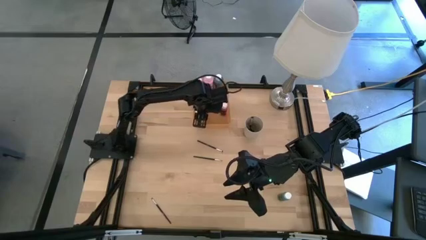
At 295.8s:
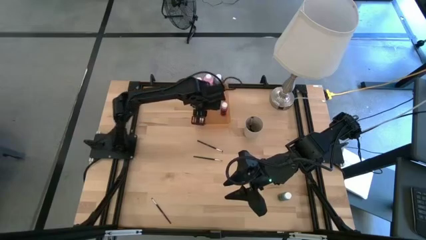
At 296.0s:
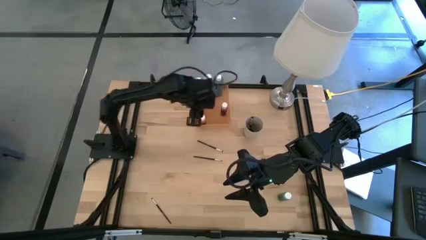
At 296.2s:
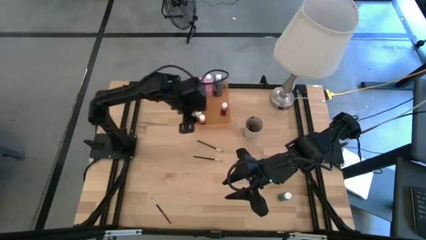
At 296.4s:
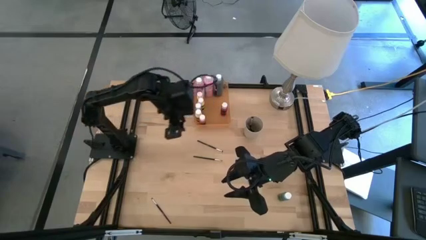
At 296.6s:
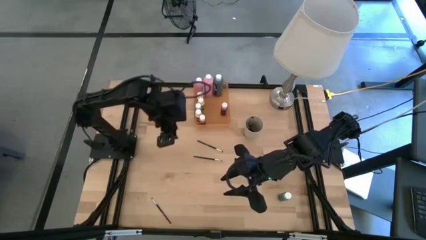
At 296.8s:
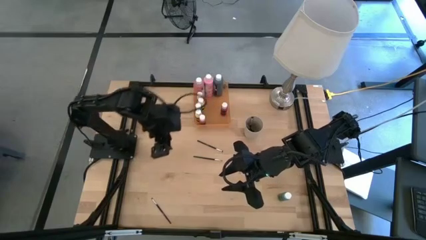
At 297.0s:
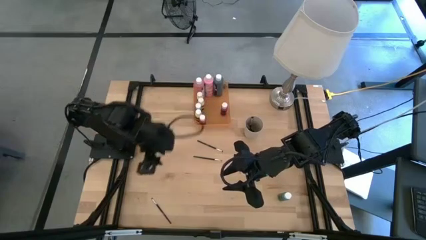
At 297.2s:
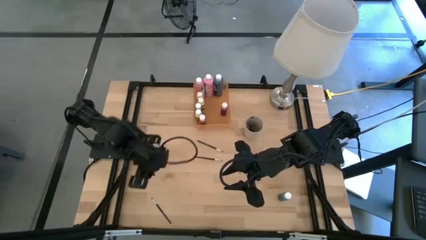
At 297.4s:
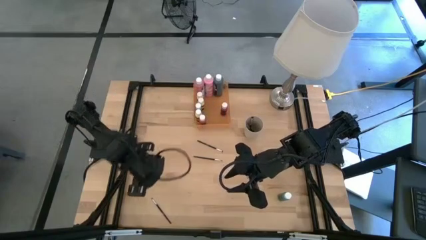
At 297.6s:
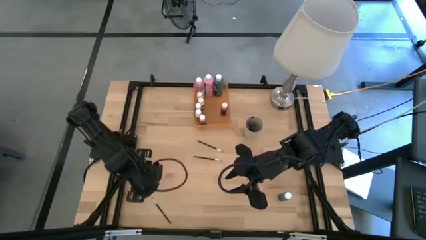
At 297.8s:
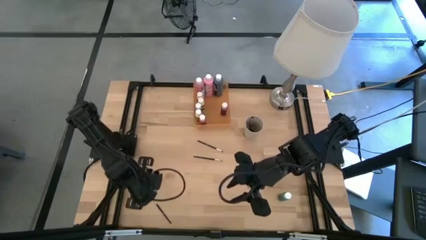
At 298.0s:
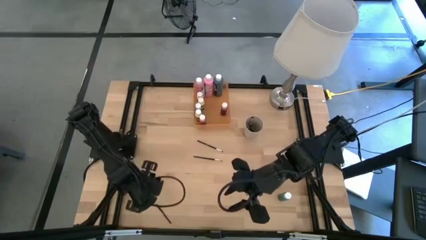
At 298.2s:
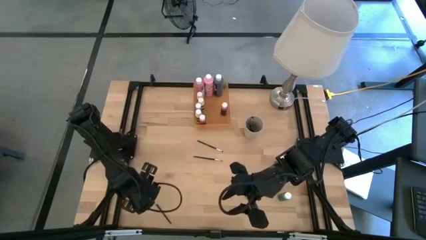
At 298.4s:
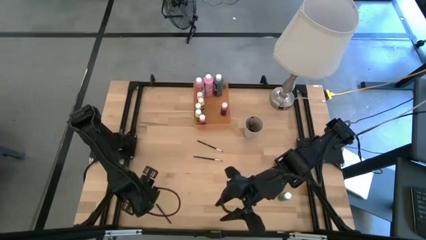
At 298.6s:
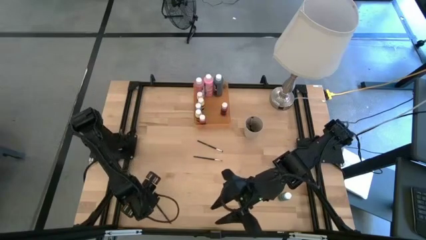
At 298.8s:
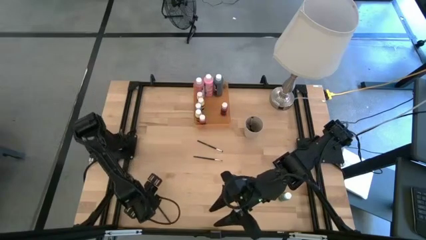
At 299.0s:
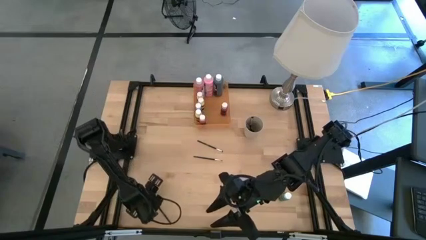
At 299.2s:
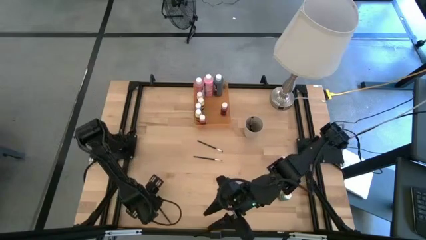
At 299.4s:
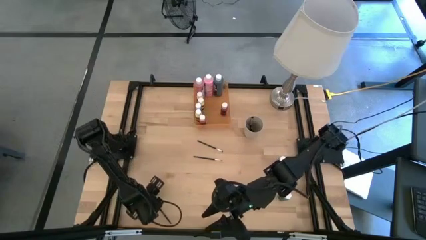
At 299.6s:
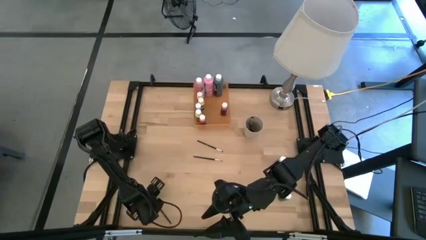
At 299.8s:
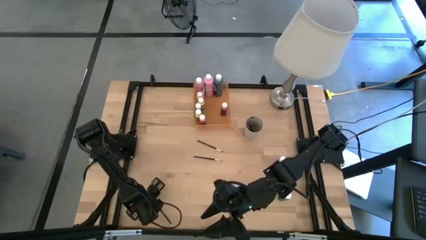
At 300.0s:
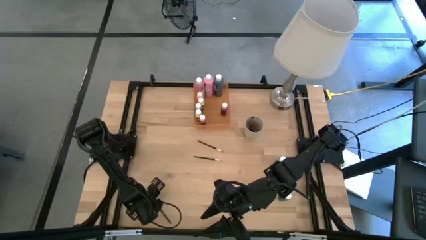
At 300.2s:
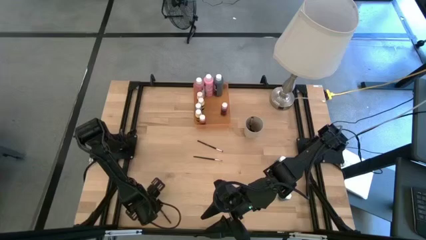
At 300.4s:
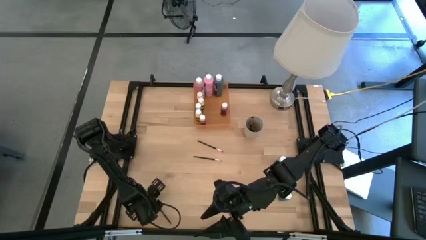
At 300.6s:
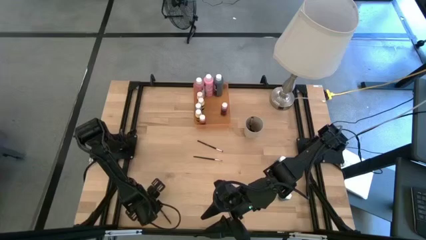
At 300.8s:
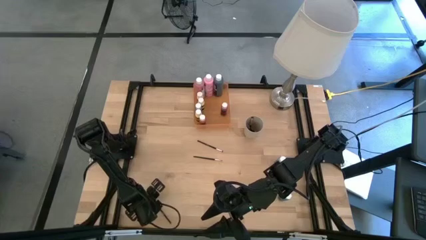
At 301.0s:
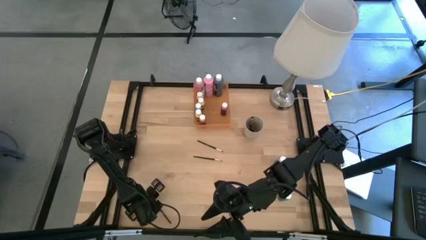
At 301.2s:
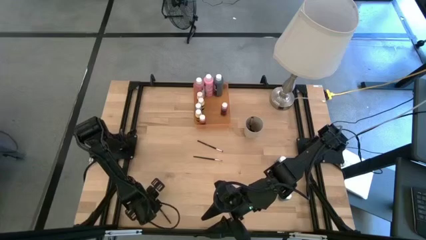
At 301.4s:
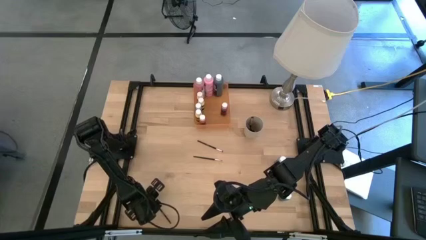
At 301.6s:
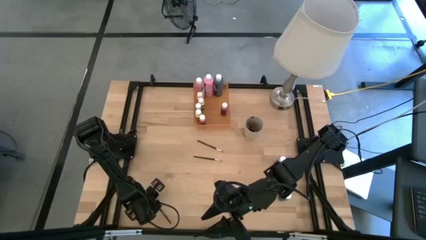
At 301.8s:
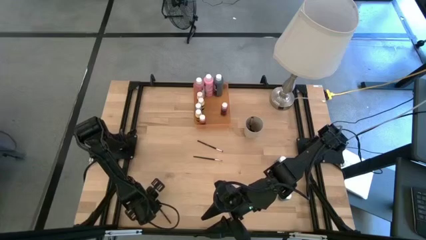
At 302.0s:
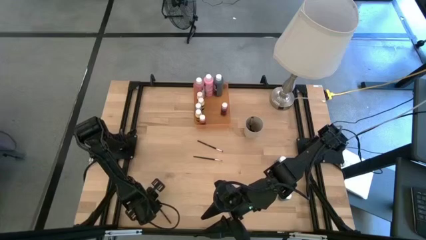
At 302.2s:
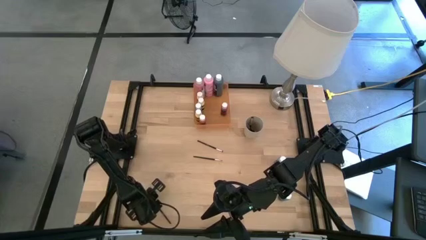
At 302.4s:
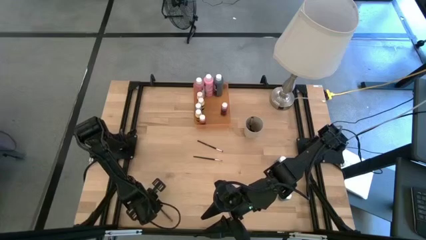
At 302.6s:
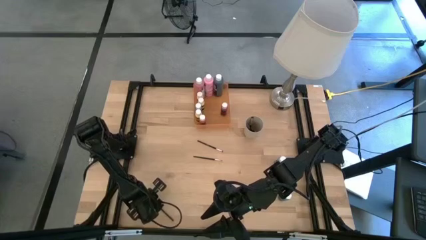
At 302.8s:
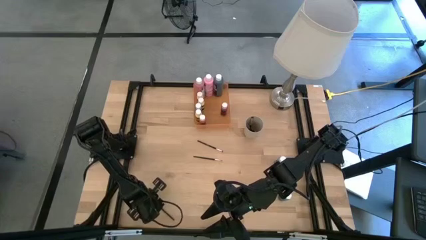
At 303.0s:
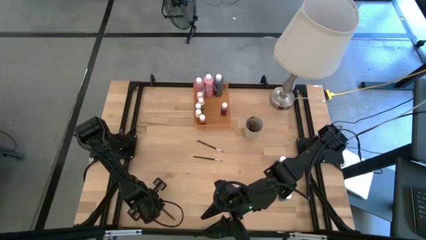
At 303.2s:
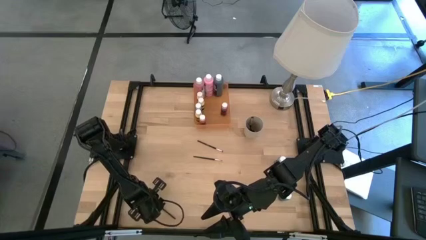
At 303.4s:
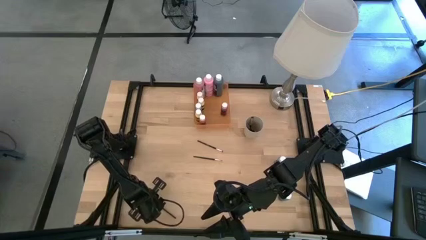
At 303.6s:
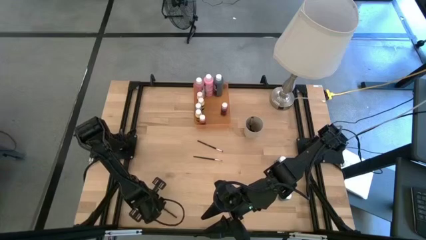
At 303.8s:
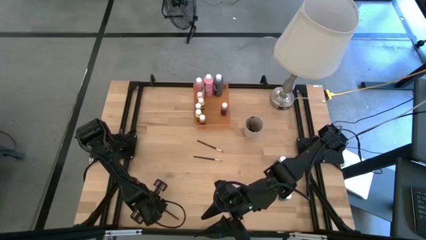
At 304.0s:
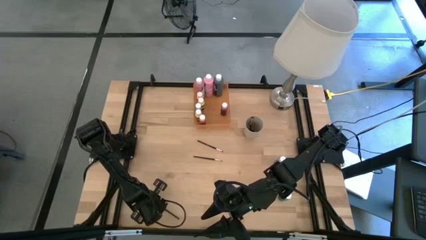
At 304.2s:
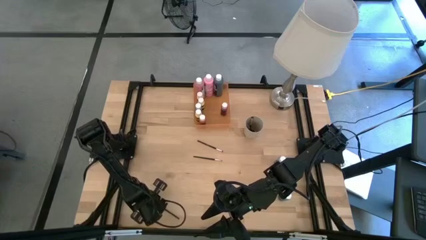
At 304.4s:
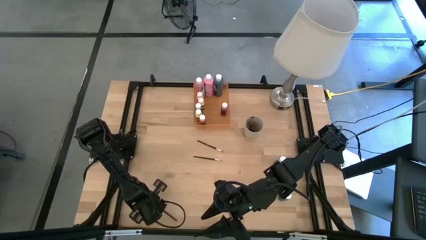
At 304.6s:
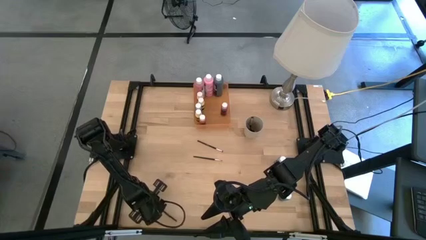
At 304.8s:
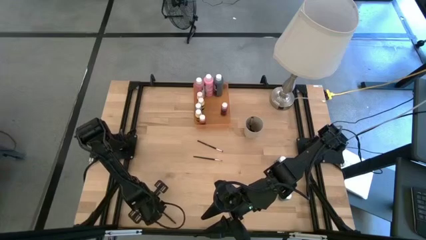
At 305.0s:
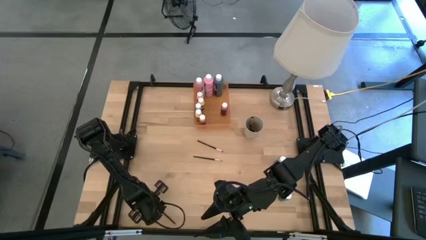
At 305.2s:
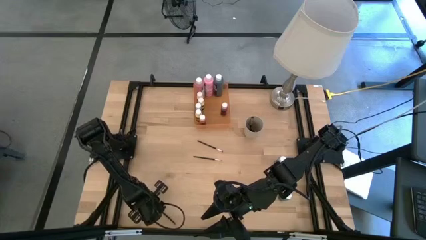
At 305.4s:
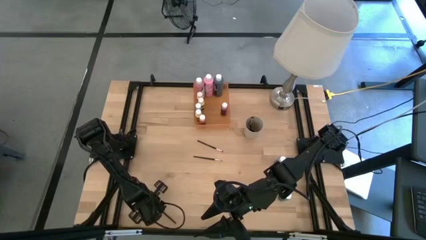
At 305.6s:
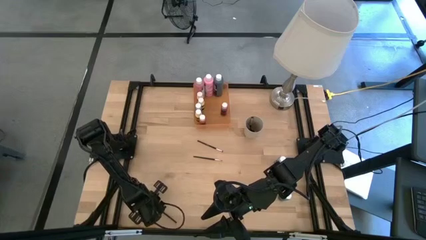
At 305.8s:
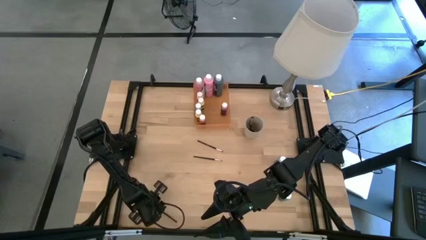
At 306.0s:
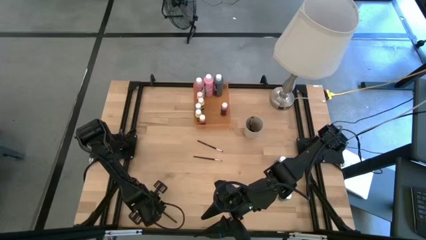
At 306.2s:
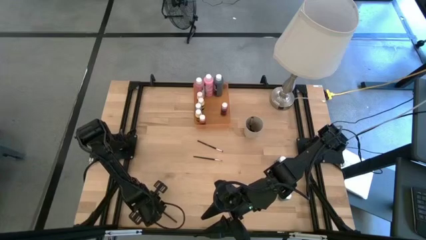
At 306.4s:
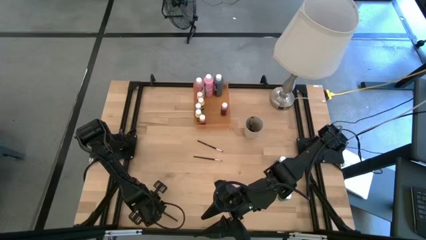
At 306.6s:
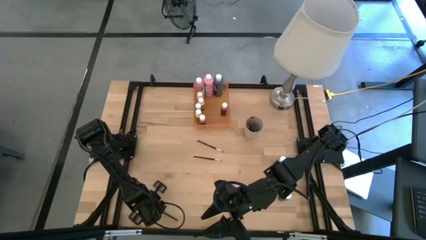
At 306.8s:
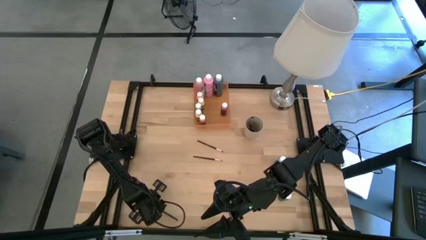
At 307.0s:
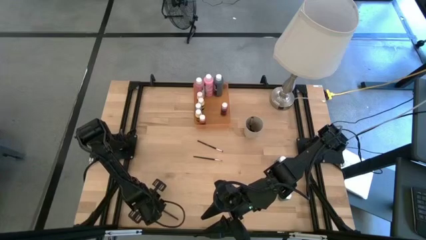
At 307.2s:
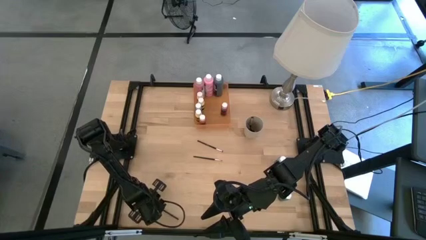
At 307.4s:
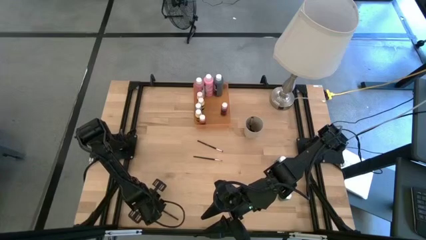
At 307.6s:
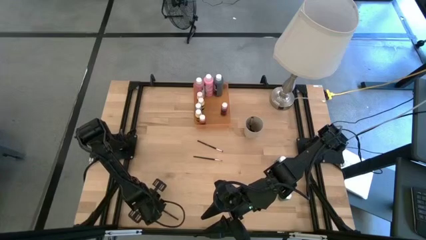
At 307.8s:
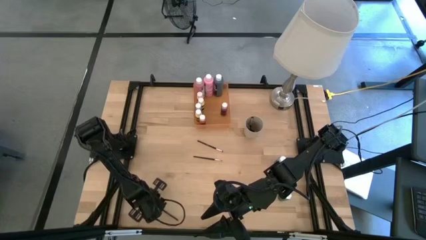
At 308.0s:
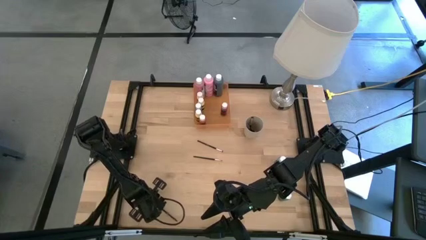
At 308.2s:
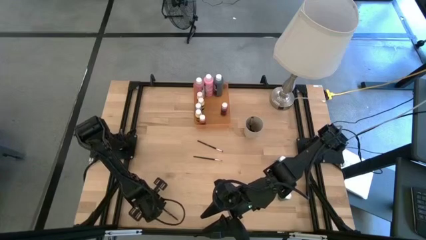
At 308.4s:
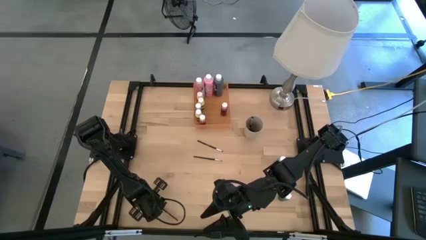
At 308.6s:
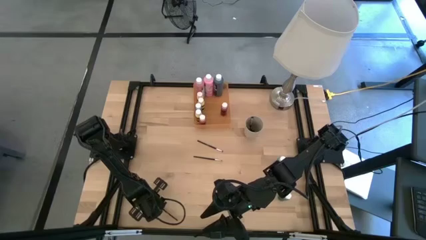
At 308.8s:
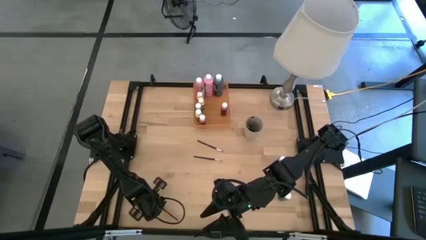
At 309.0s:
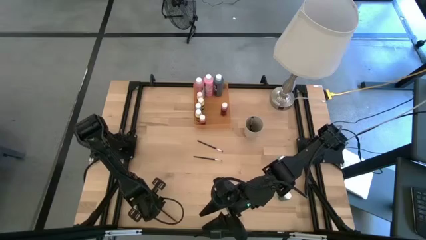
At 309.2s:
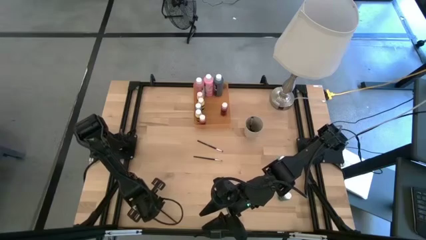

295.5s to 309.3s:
Task: Pick & Place Paint Supplies
Put the black paint brush into the light brown cup

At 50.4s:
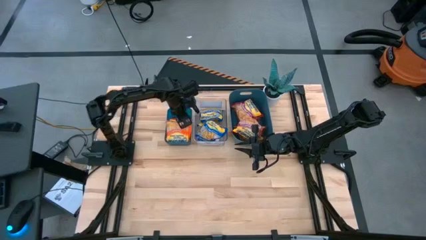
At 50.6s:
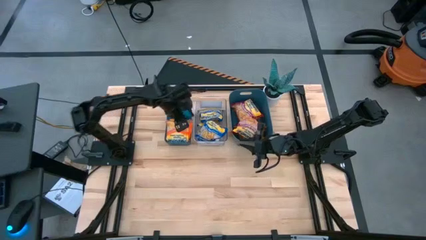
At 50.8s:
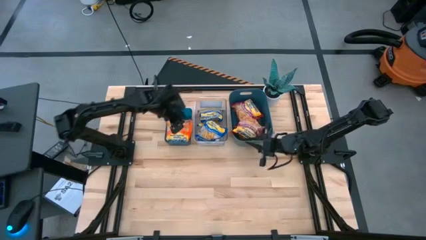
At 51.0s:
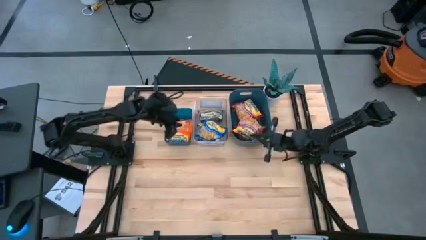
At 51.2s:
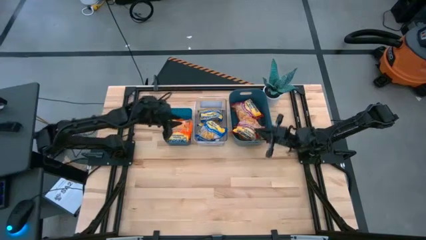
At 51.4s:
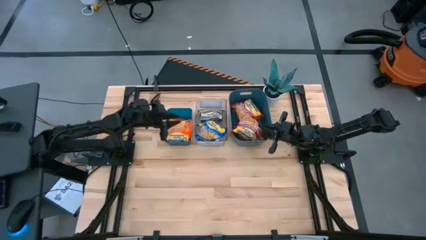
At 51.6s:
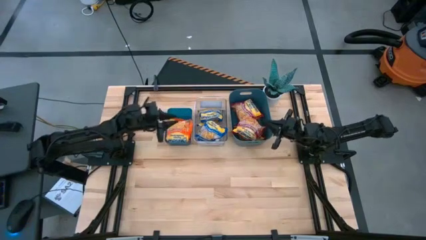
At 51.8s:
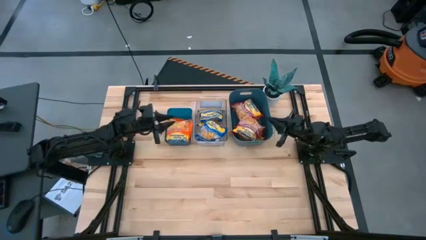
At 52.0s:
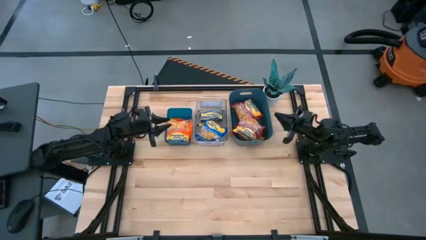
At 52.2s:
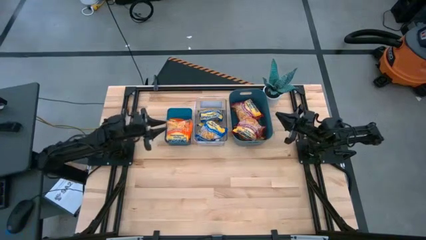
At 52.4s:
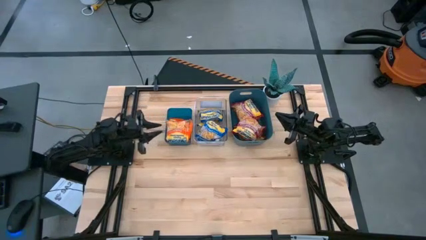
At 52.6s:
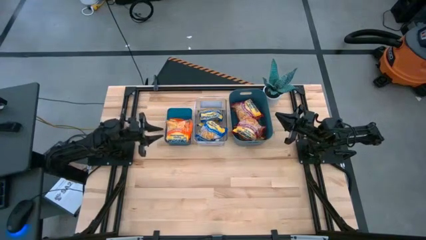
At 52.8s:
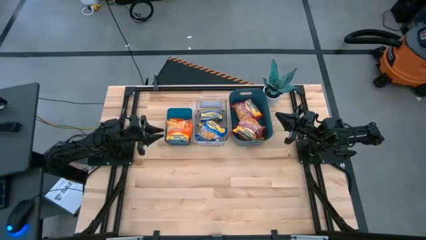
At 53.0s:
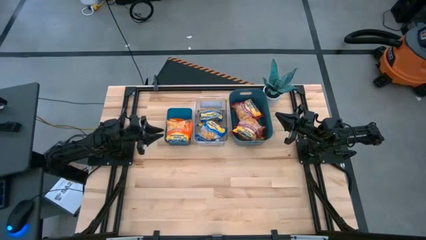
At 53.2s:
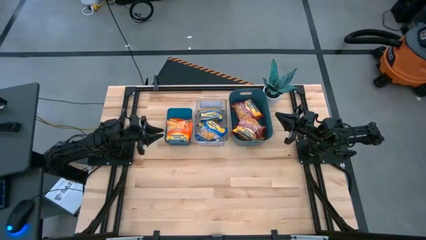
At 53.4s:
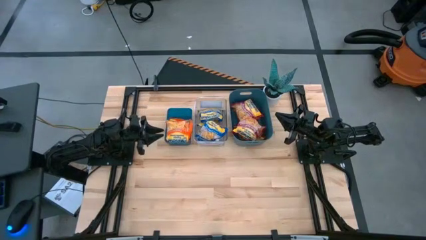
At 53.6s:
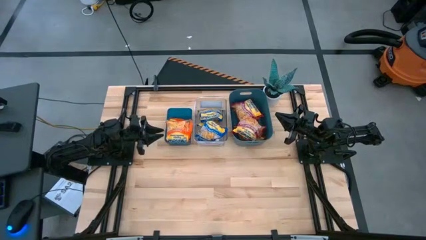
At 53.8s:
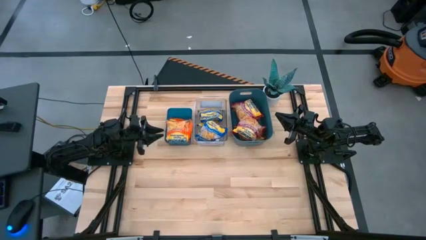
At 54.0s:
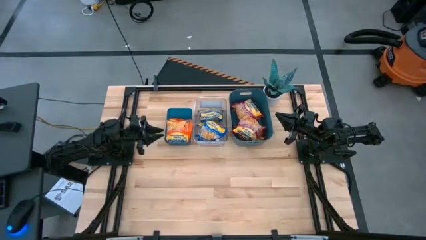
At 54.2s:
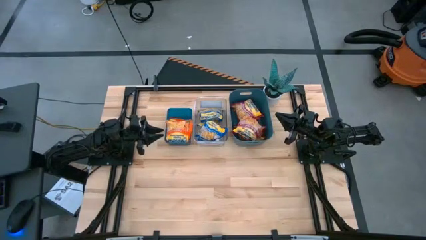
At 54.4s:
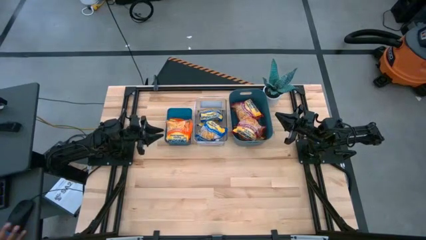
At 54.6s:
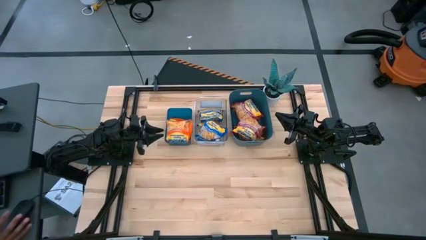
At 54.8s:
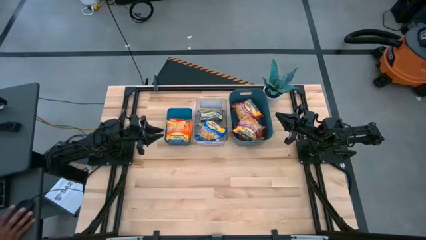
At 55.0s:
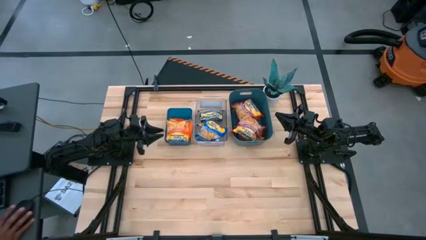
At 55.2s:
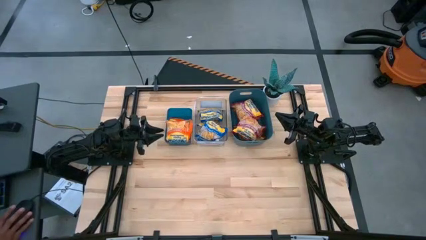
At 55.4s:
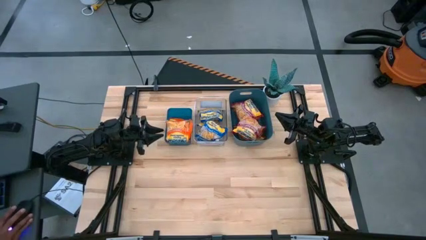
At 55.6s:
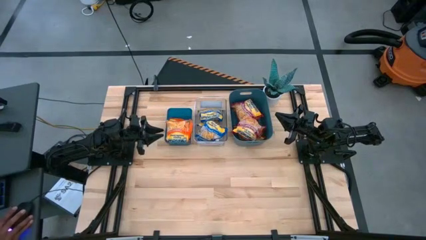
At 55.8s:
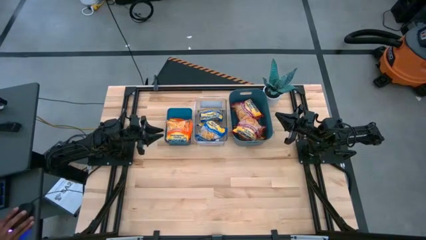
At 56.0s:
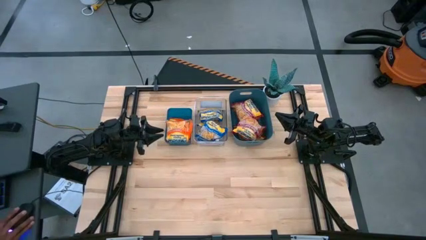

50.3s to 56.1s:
Task: Sort Maruchan noodles
Return to Home Position
